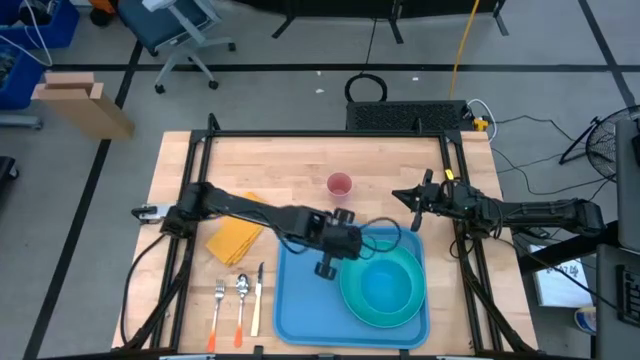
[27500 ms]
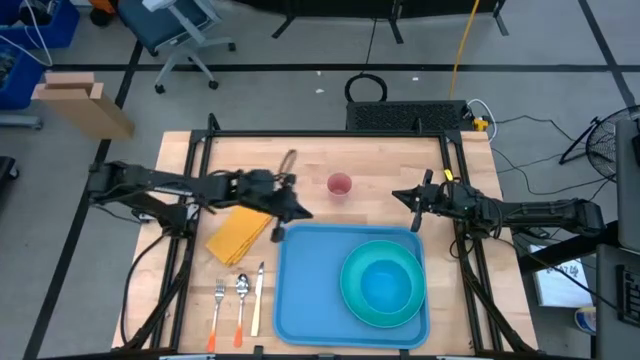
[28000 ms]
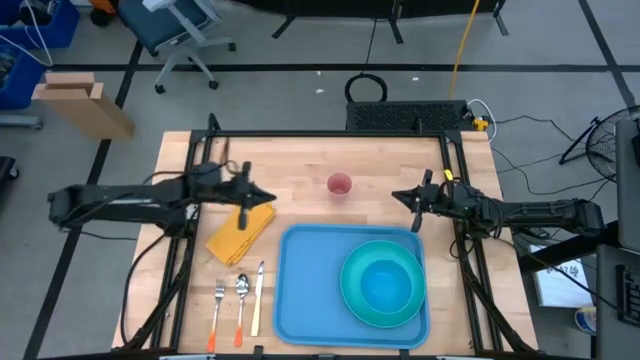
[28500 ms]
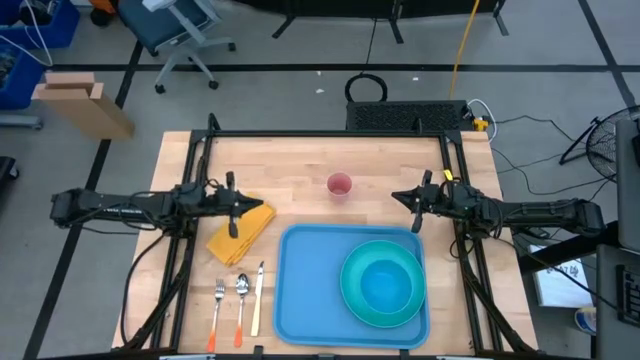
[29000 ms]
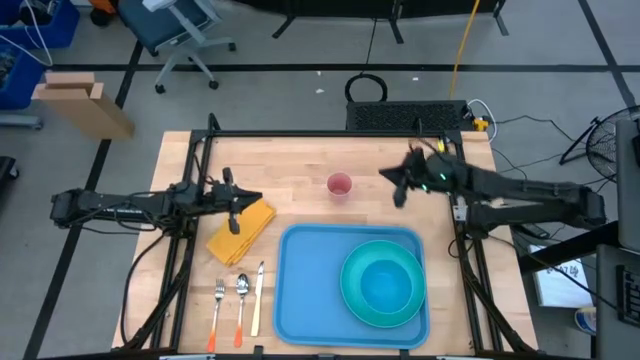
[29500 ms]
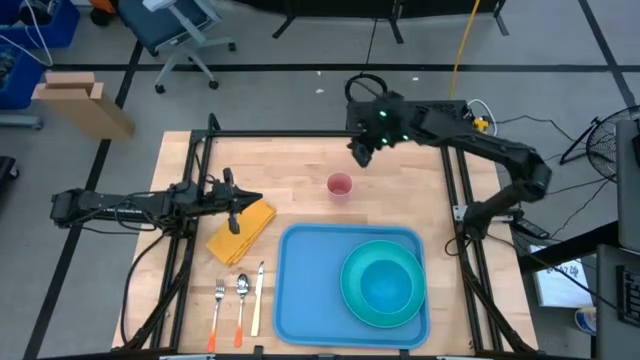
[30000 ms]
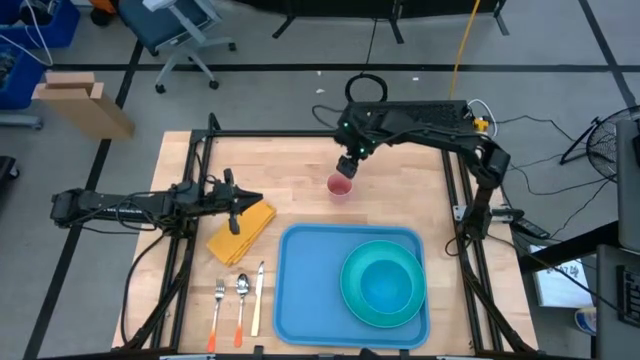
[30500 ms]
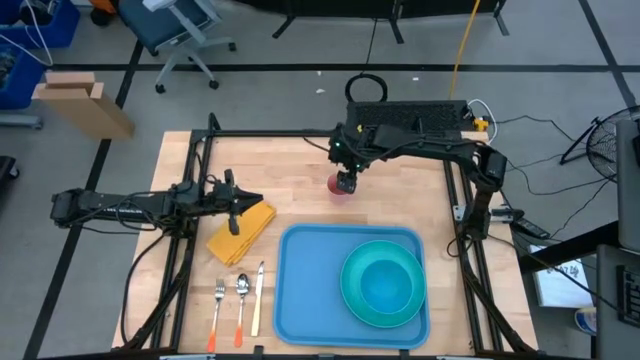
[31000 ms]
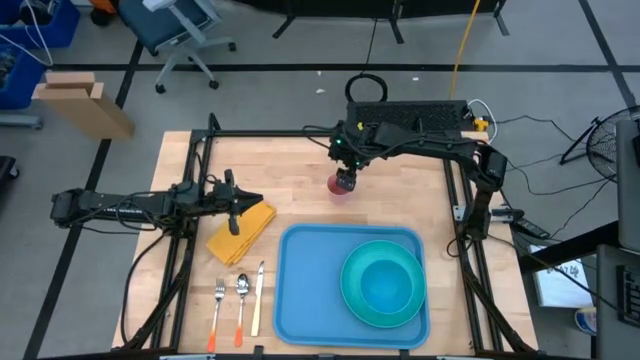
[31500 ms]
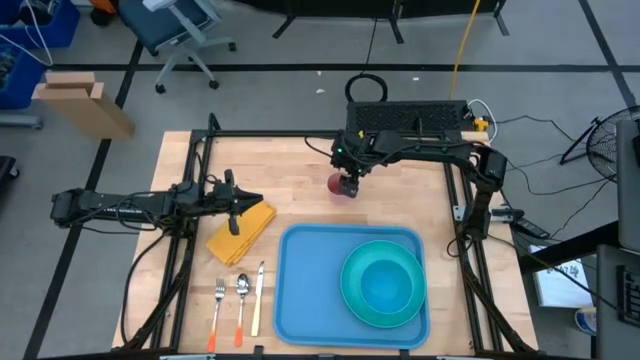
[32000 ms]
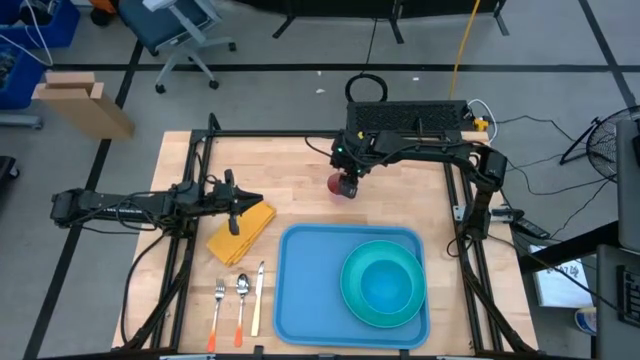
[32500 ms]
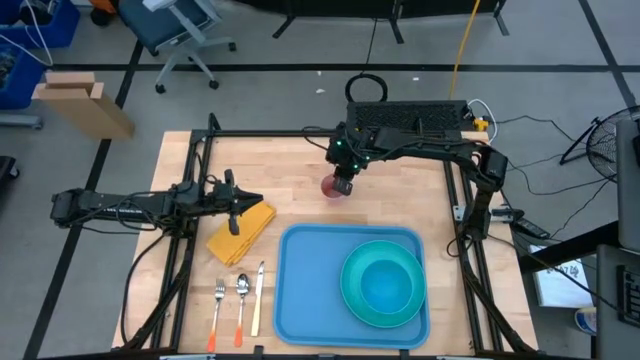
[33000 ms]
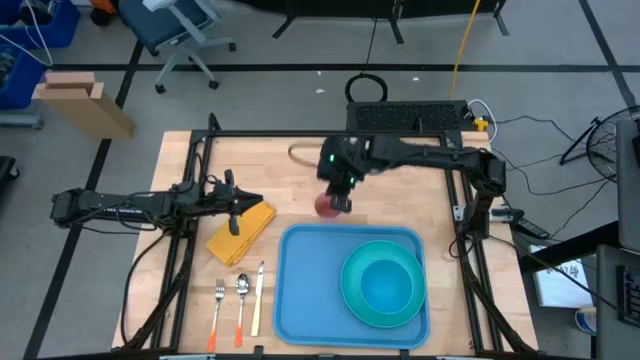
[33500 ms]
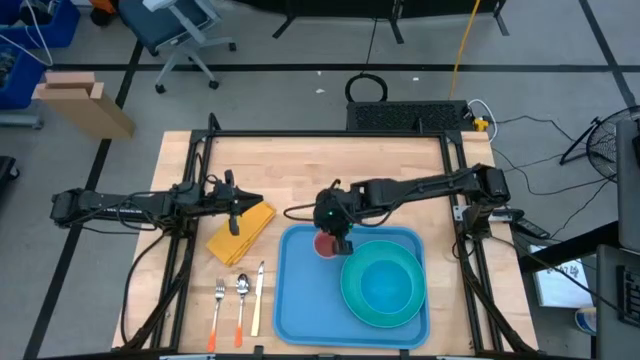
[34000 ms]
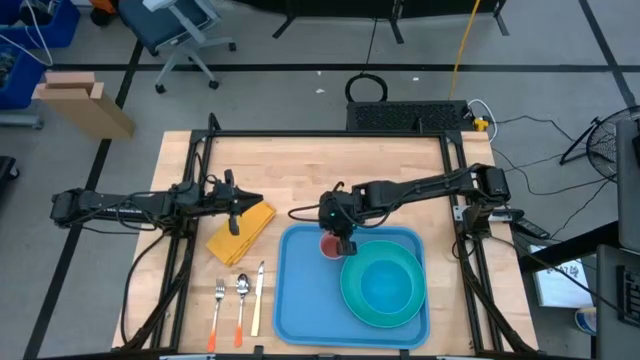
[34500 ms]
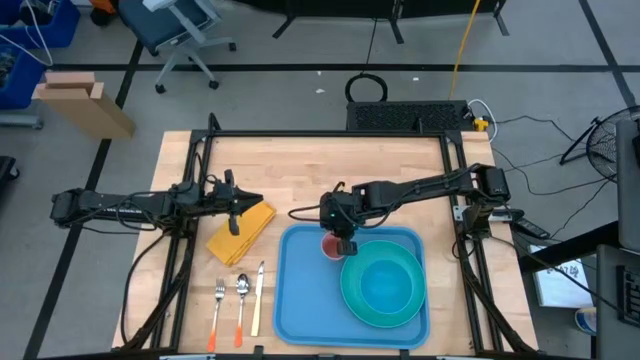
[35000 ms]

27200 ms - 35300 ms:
Task: Set up tray
Put the pink cup to the top left of the blue plate on the blue tray

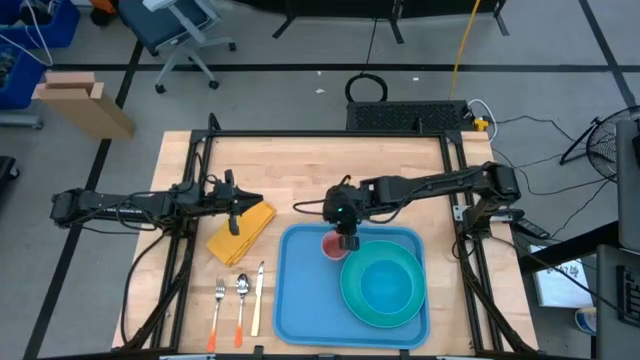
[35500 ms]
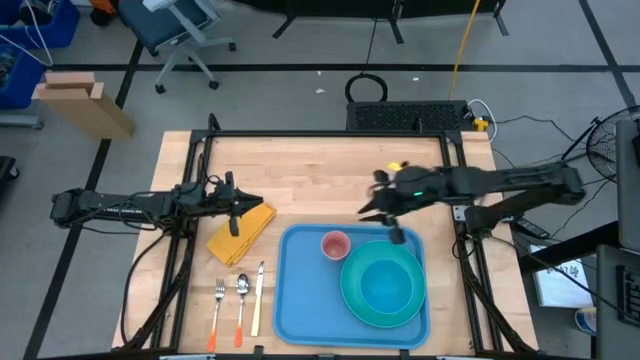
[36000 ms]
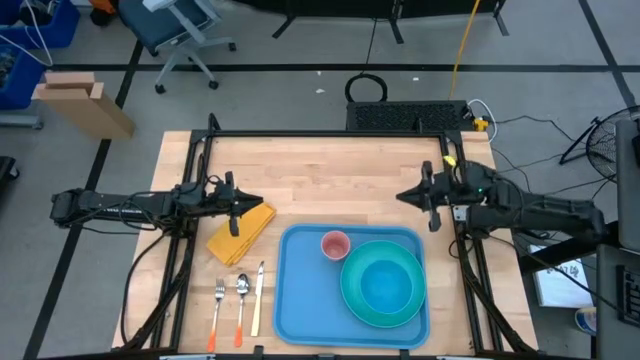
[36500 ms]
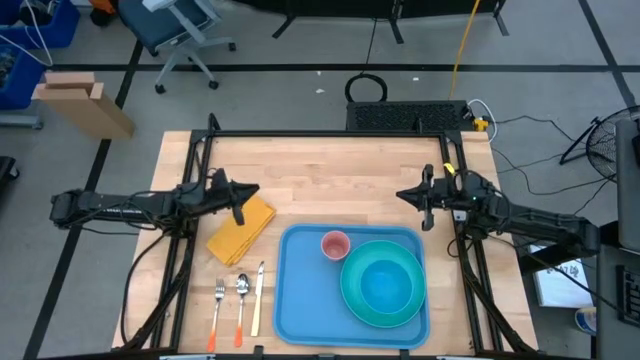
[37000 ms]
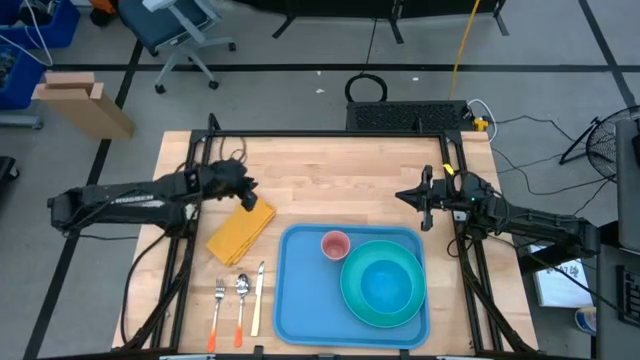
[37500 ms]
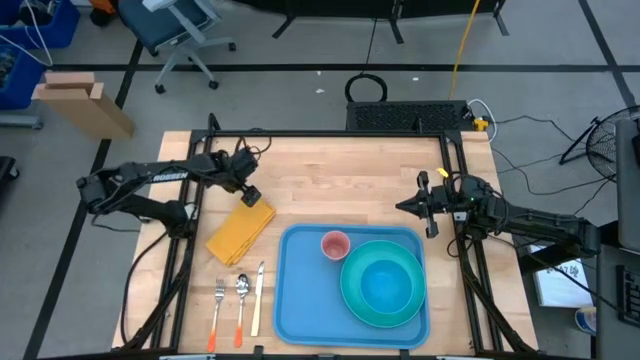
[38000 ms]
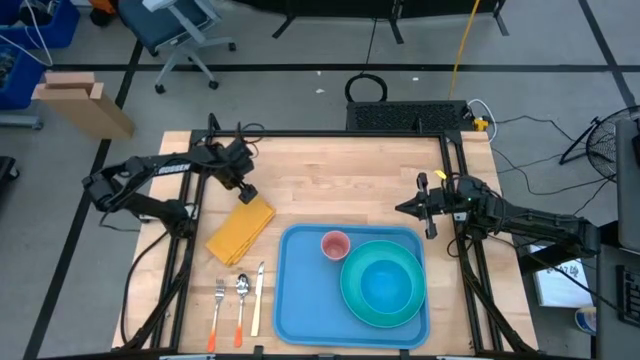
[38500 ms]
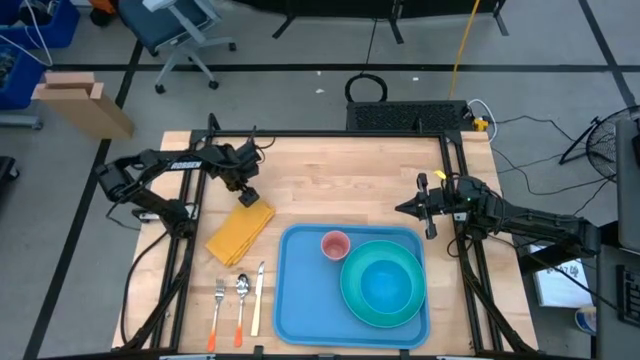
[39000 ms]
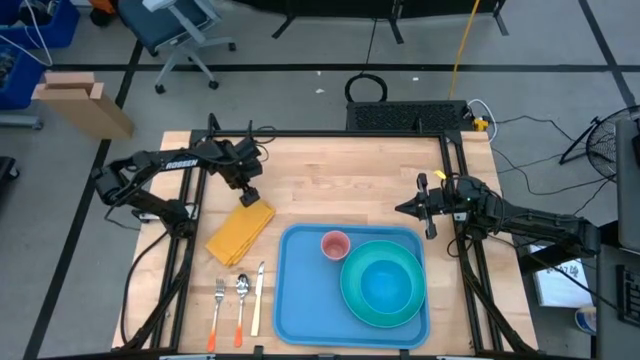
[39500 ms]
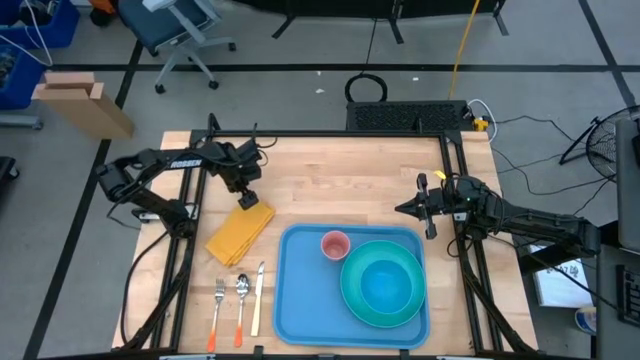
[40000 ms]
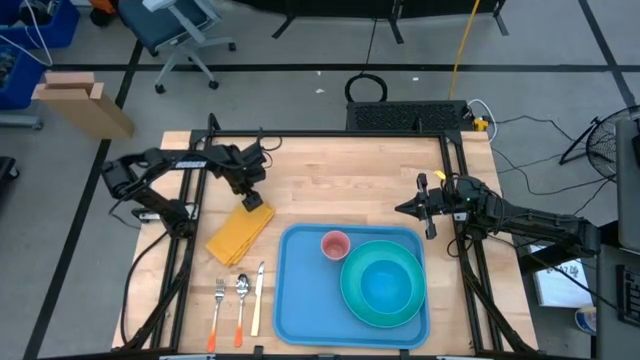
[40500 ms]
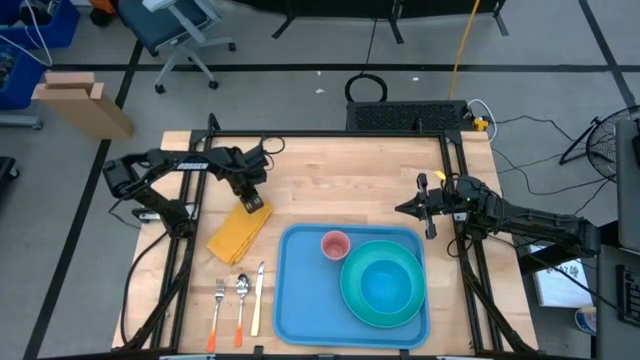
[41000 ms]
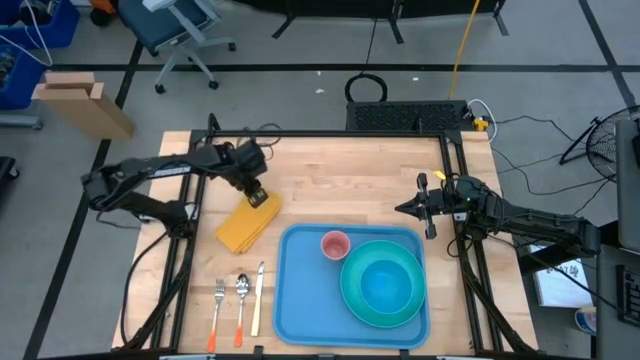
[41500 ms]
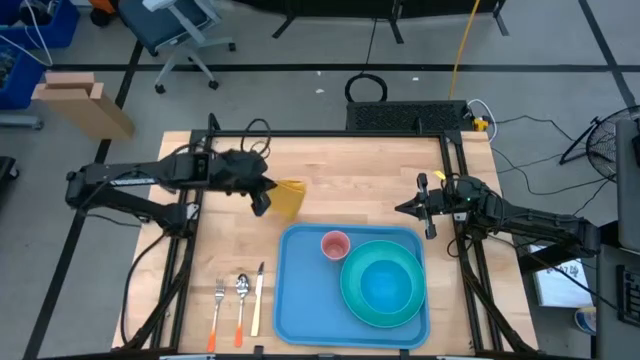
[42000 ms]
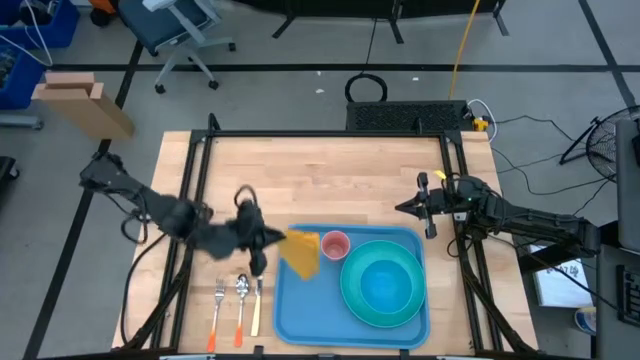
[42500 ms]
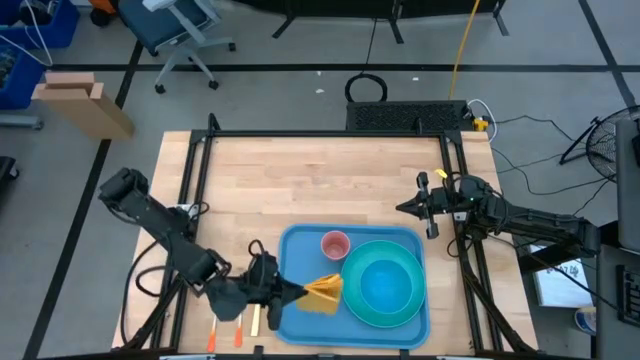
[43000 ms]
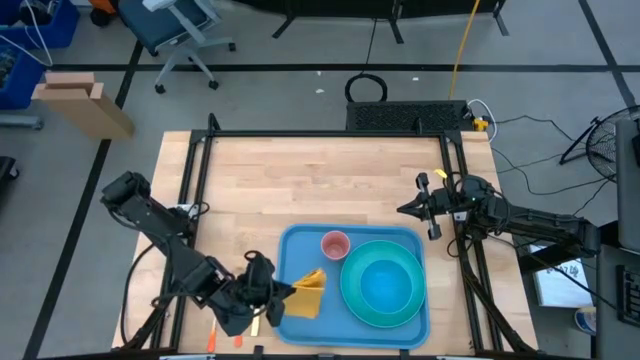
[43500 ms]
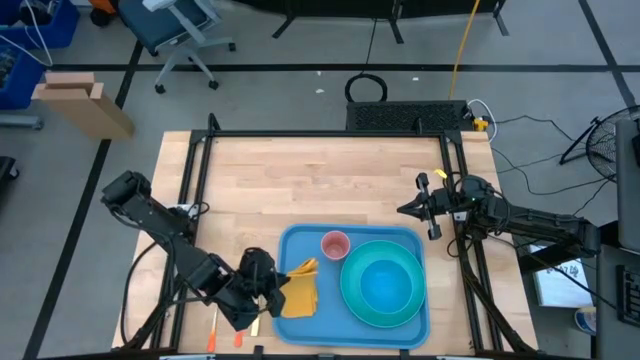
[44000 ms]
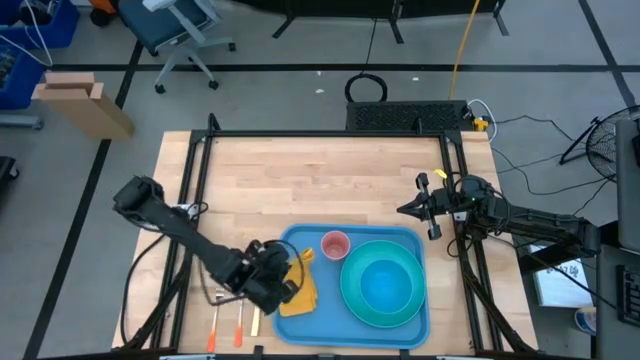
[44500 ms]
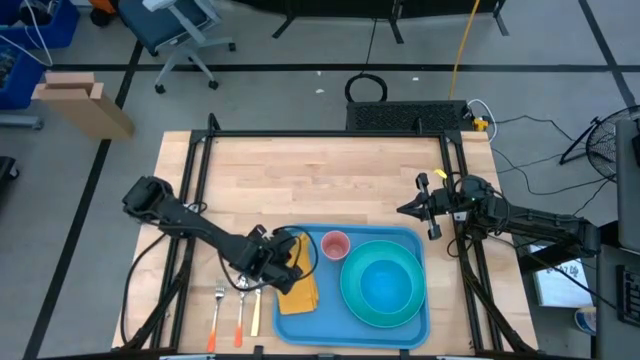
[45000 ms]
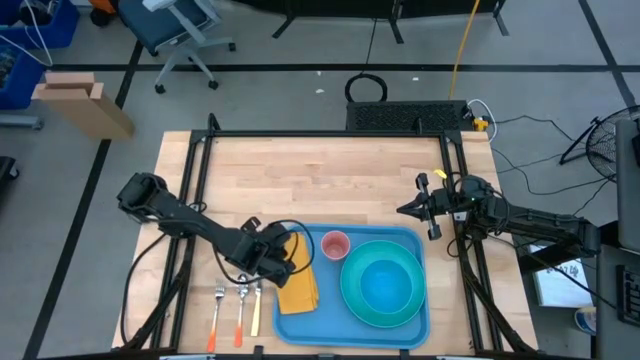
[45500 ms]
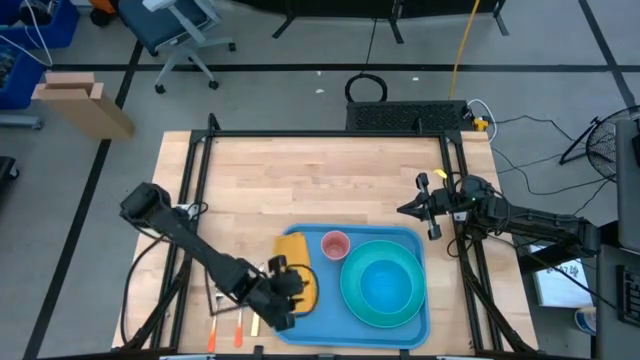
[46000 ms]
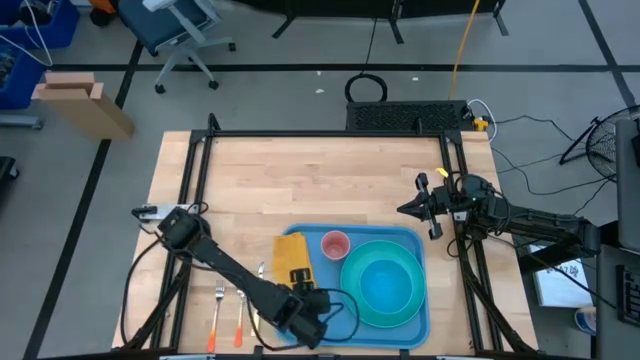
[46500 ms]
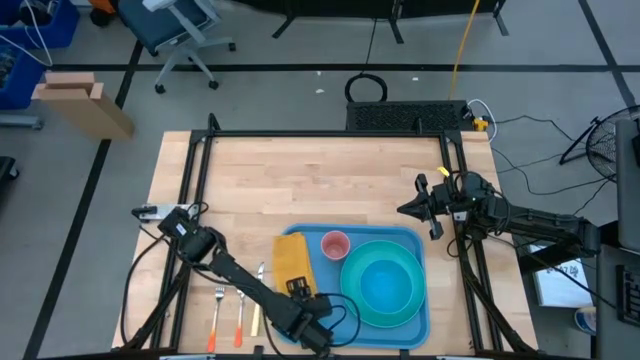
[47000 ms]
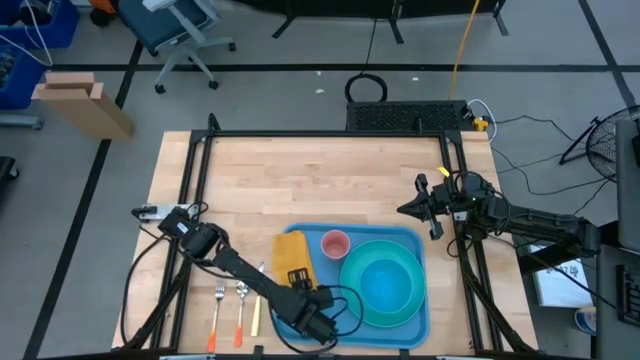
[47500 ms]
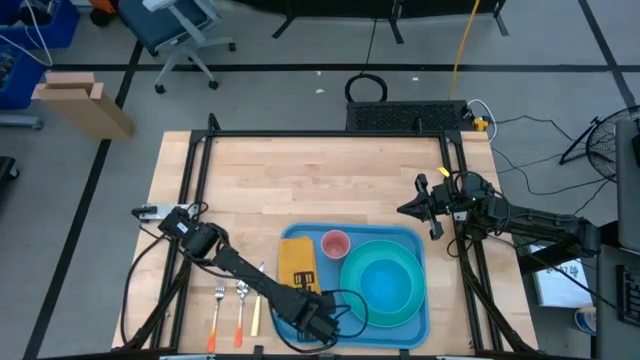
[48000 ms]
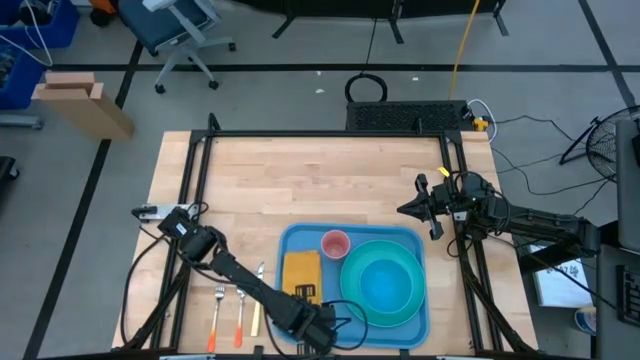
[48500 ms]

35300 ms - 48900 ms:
Put the yellow napkin to the left of the blue tray
